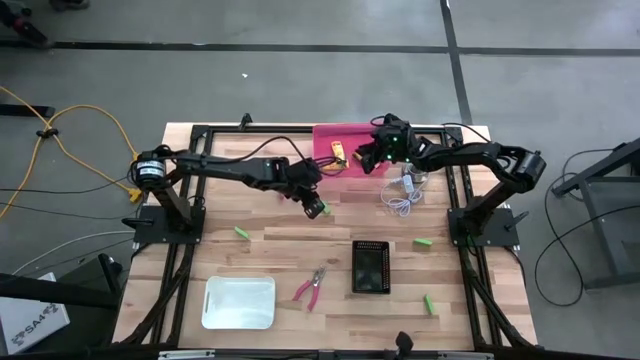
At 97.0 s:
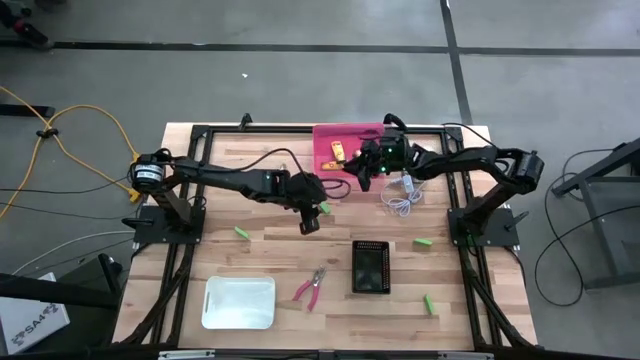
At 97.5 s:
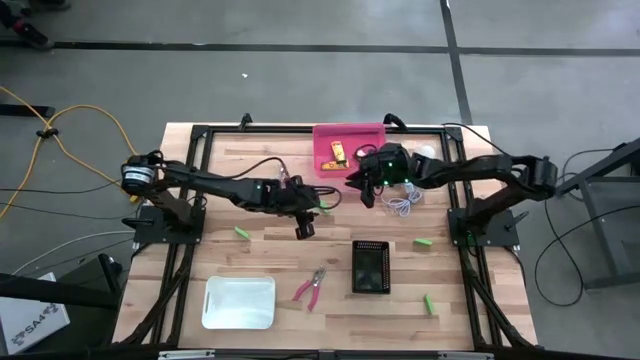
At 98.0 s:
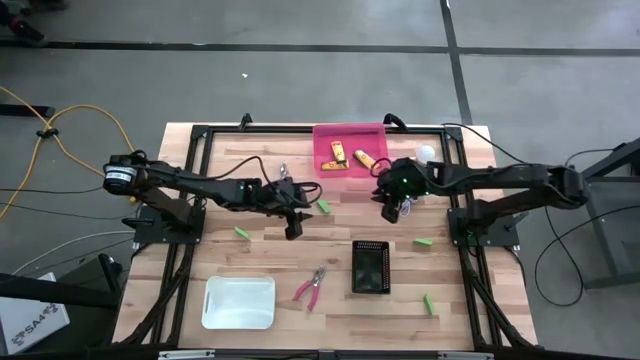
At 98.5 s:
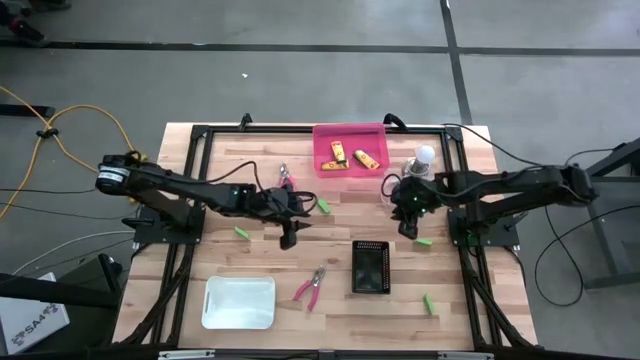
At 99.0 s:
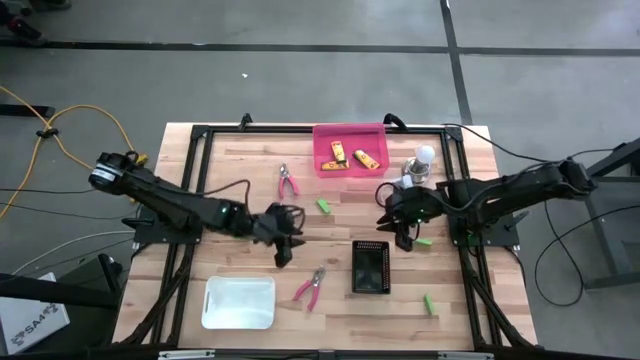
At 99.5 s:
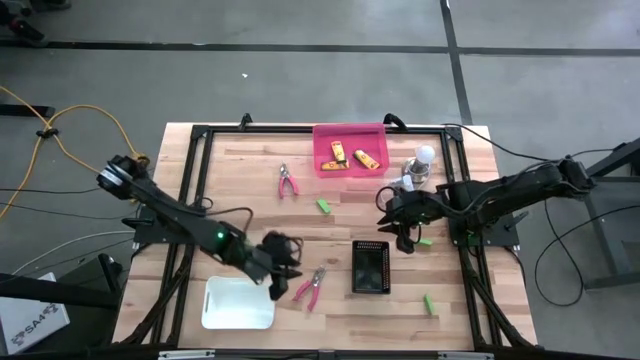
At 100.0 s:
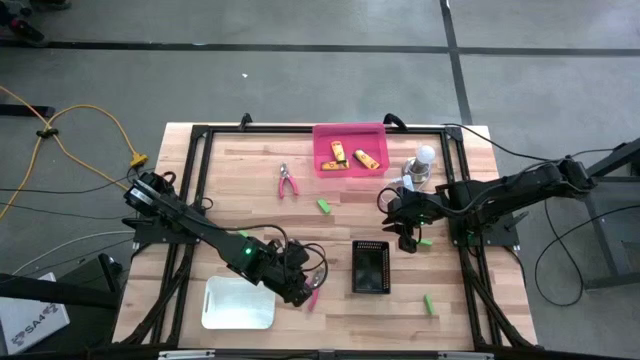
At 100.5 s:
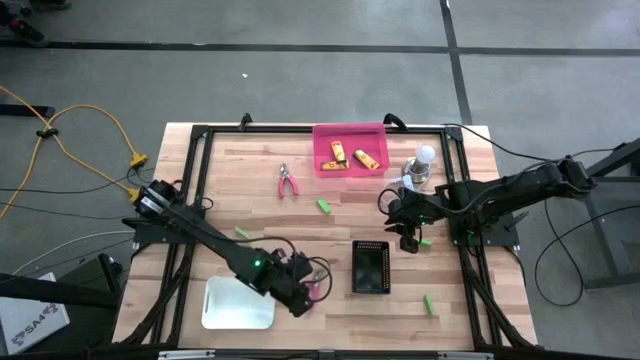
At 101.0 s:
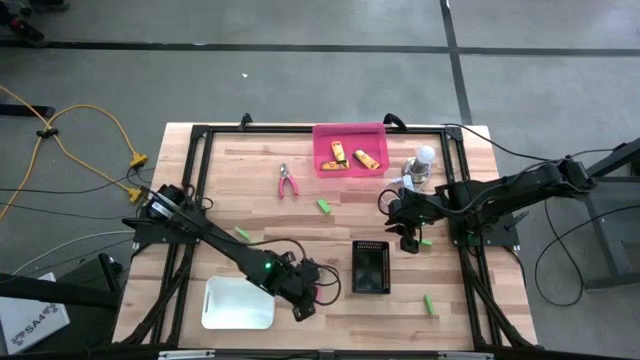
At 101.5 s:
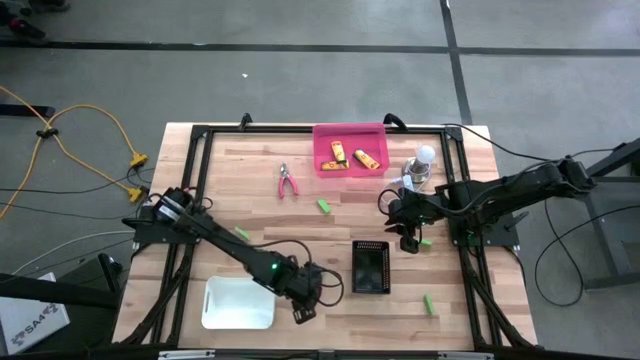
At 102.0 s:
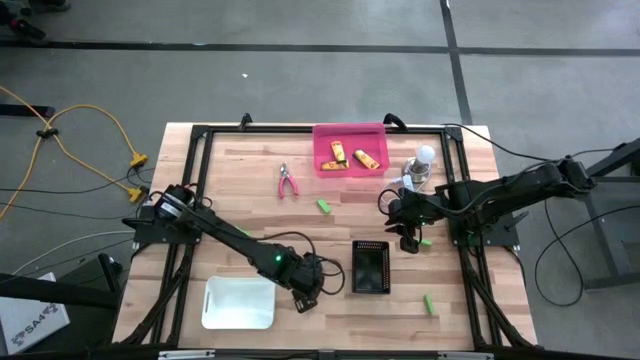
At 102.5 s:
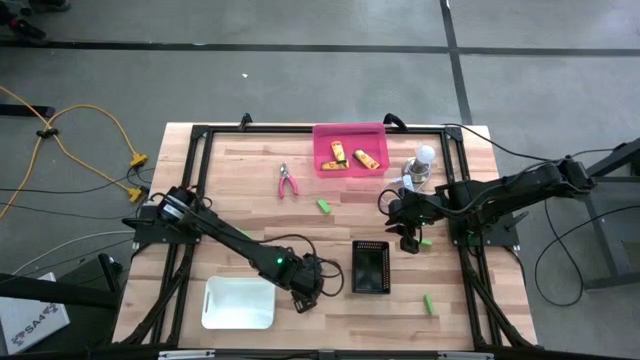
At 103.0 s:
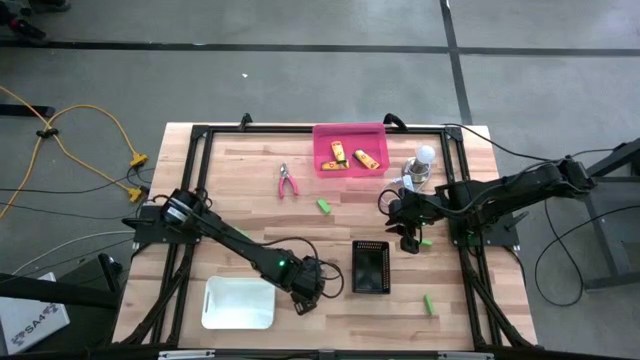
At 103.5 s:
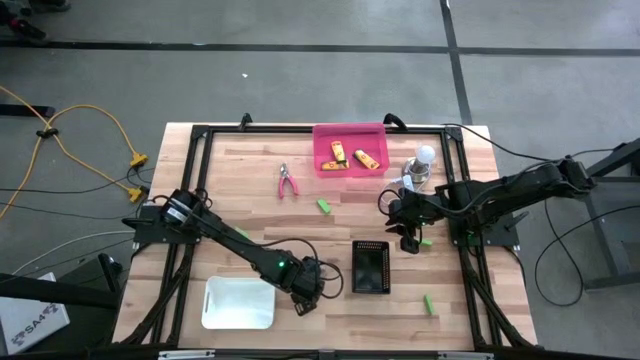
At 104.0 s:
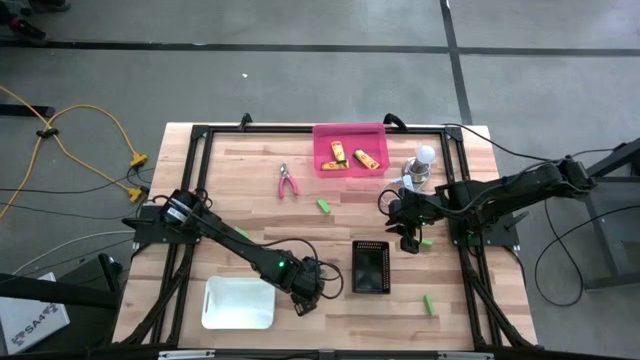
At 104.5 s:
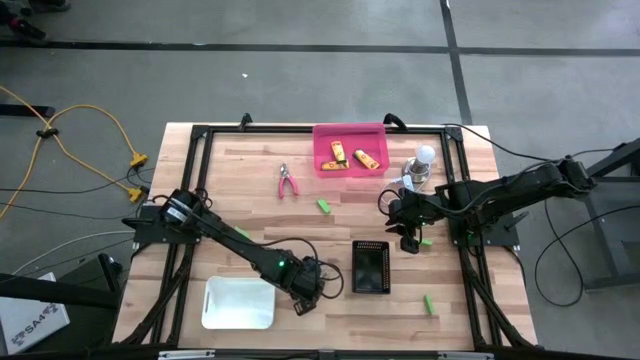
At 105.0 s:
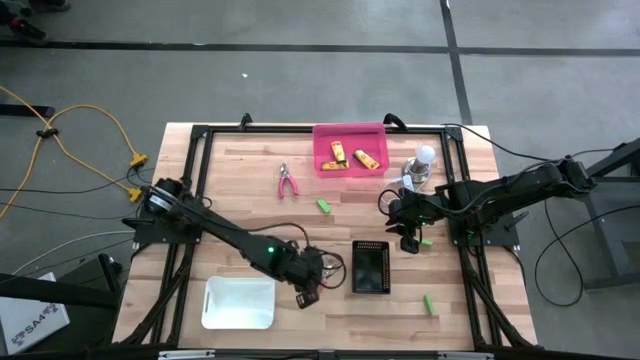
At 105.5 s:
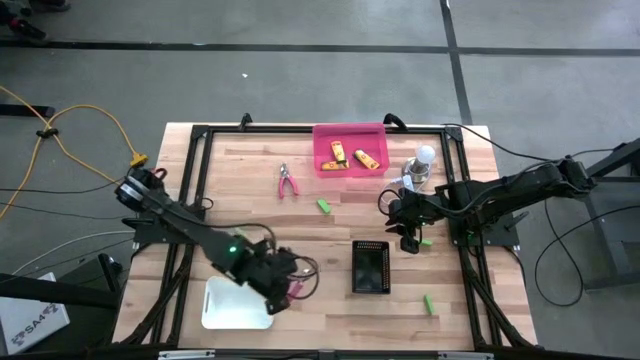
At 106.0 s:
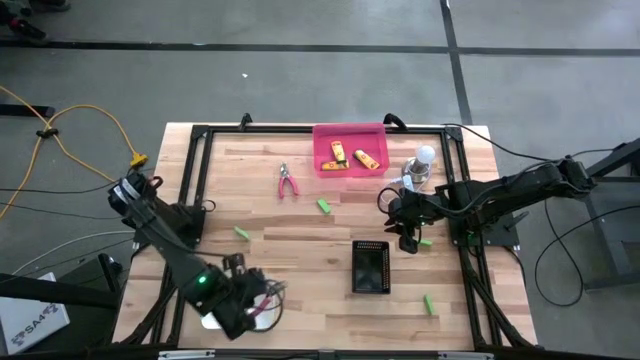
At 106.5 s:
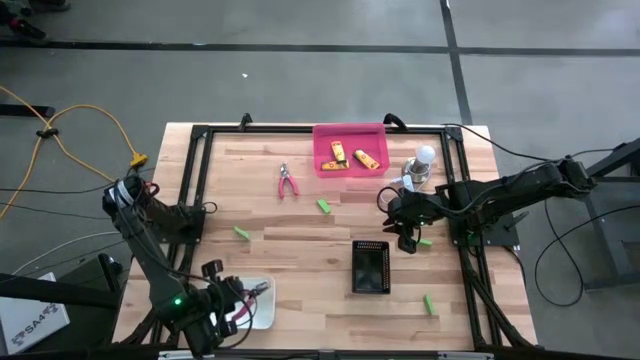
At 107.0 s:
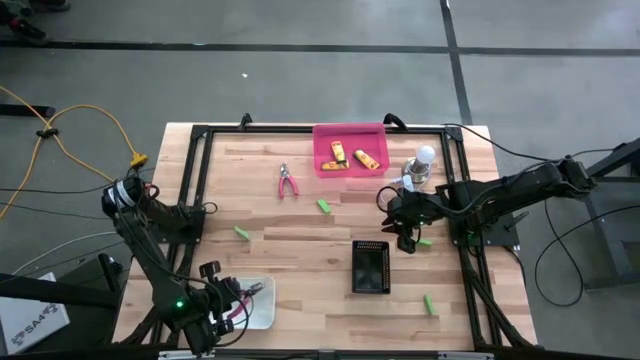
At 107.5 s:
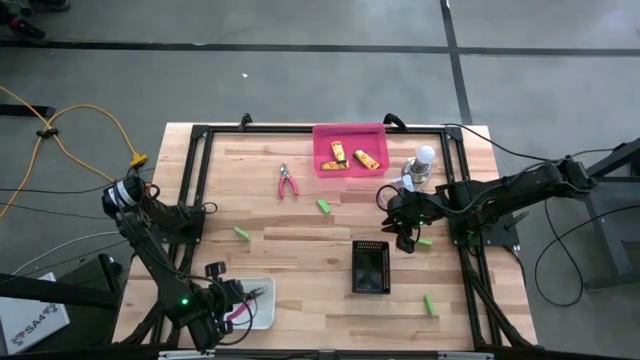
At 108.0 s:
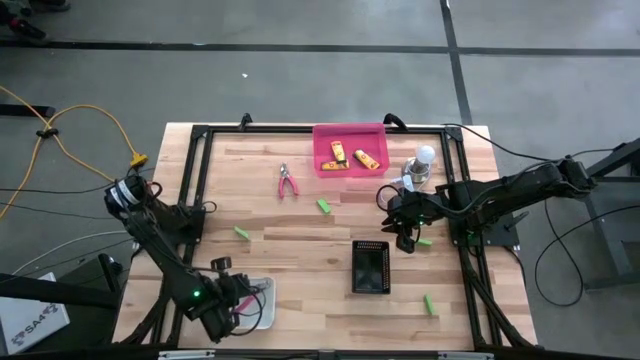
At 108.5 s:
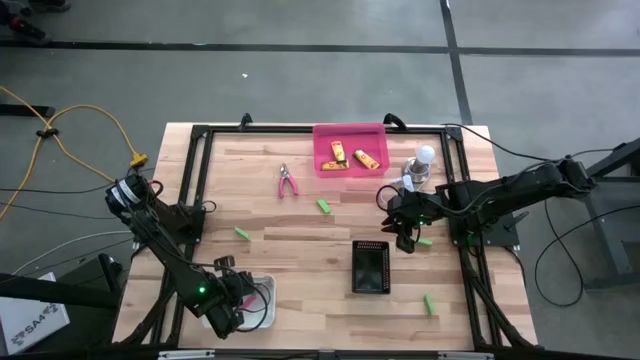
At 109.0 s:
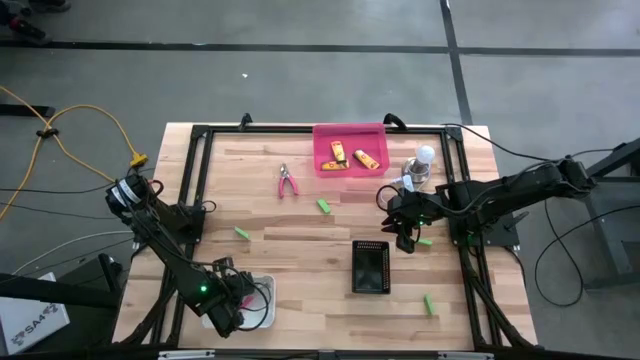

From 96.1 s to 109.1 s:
Task: Pick & Place School Supplies
Put the pink ticket punch into the white bin

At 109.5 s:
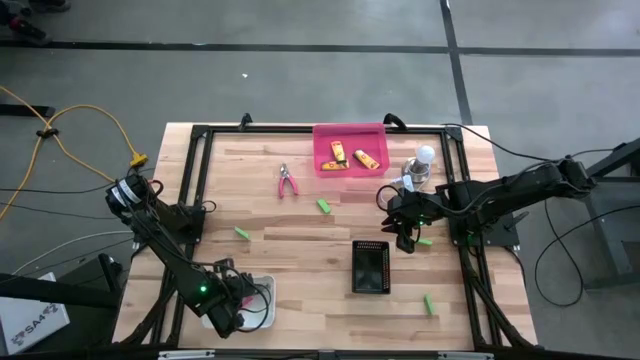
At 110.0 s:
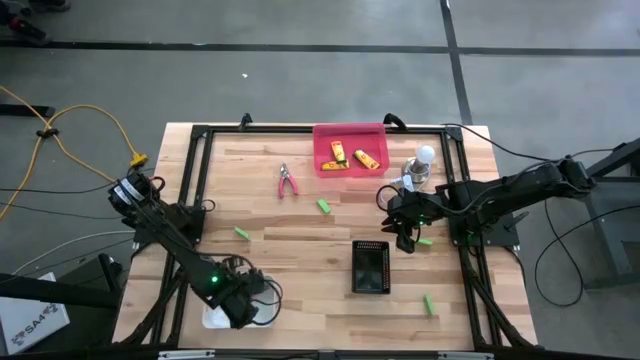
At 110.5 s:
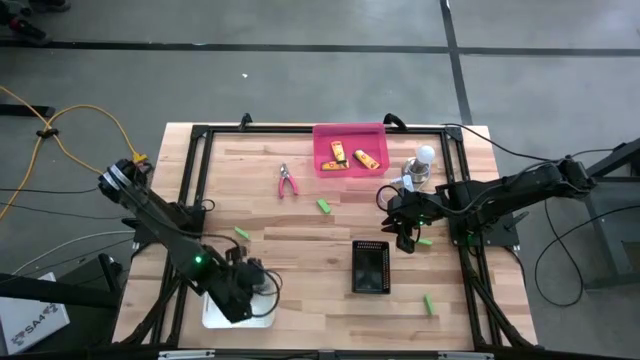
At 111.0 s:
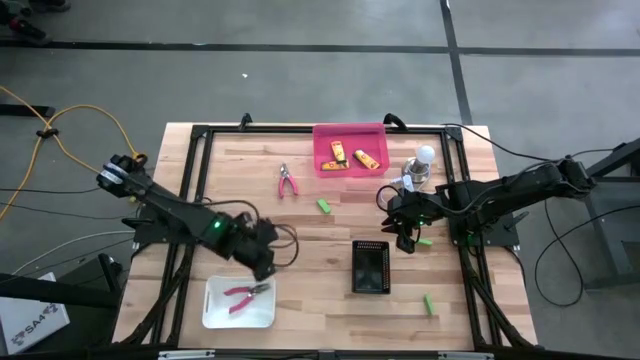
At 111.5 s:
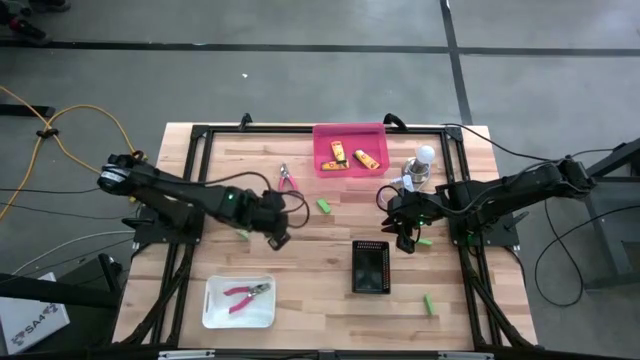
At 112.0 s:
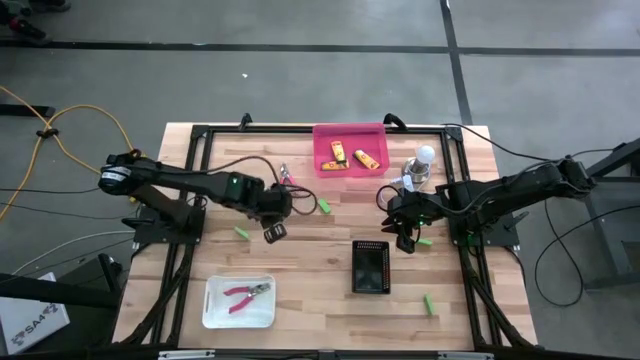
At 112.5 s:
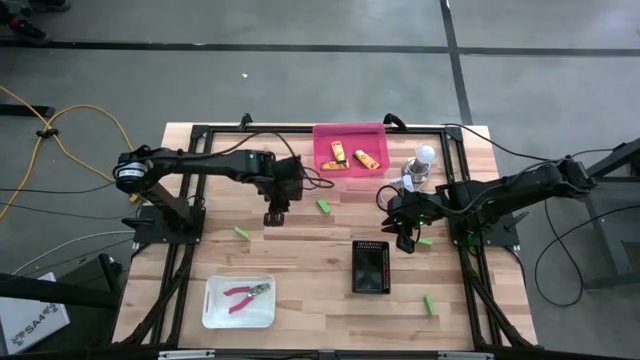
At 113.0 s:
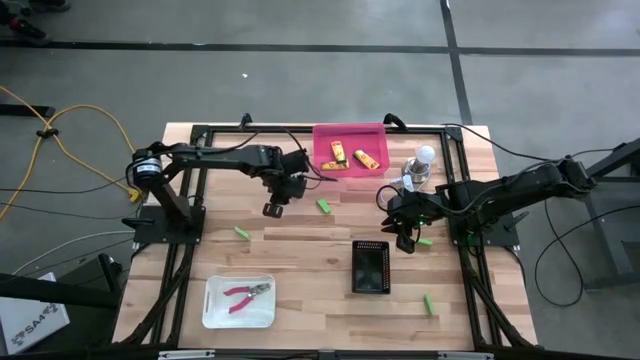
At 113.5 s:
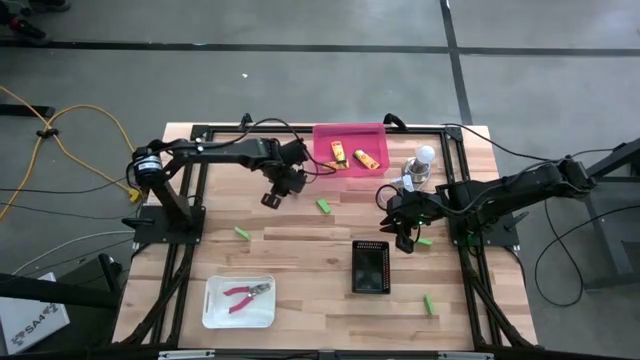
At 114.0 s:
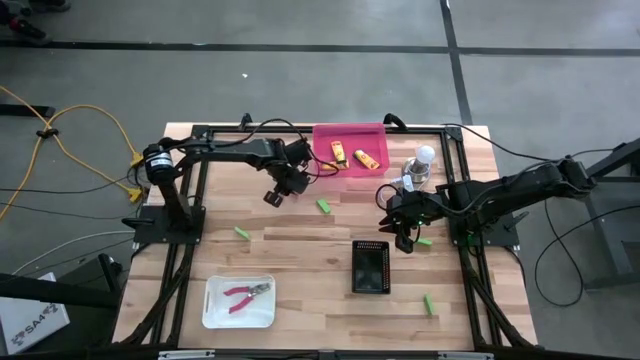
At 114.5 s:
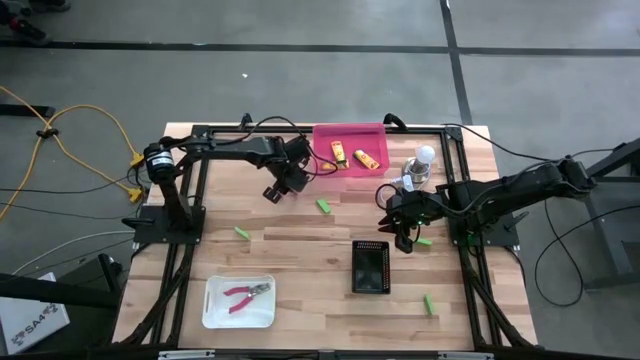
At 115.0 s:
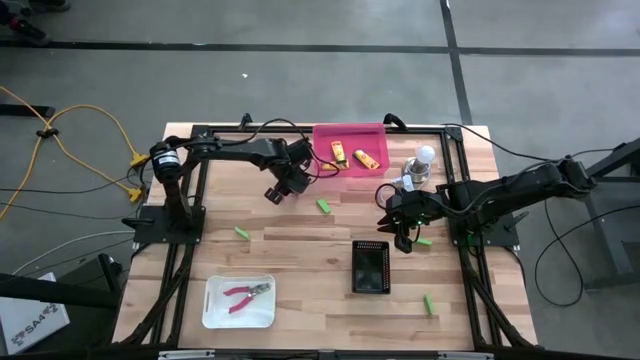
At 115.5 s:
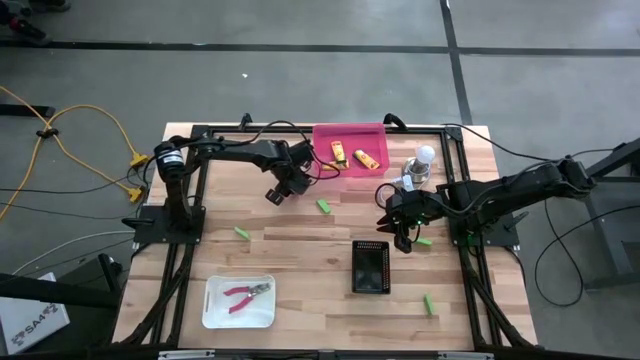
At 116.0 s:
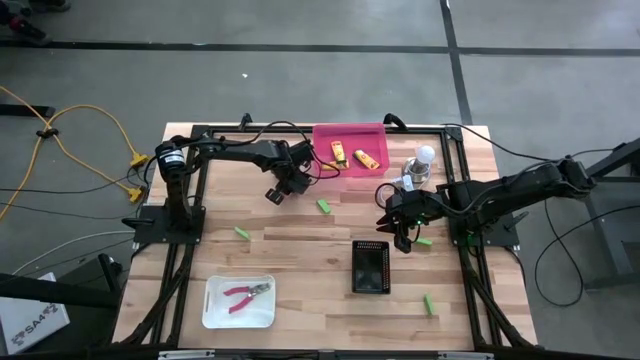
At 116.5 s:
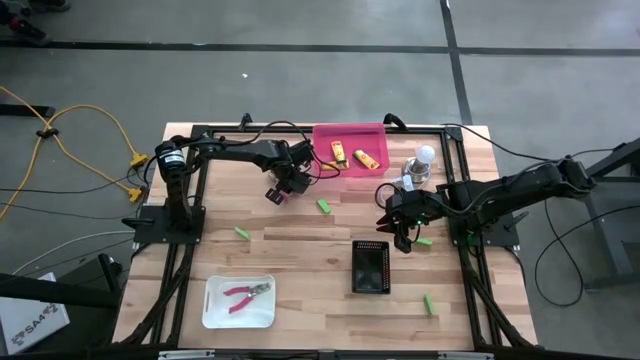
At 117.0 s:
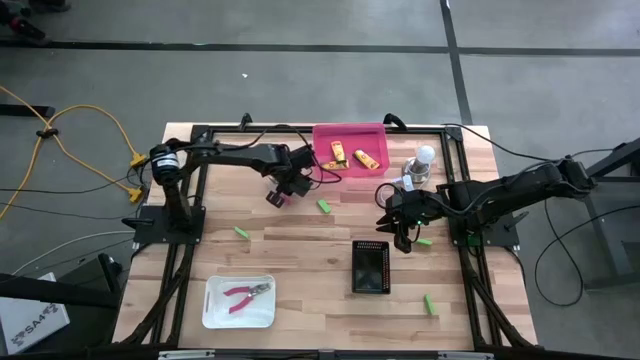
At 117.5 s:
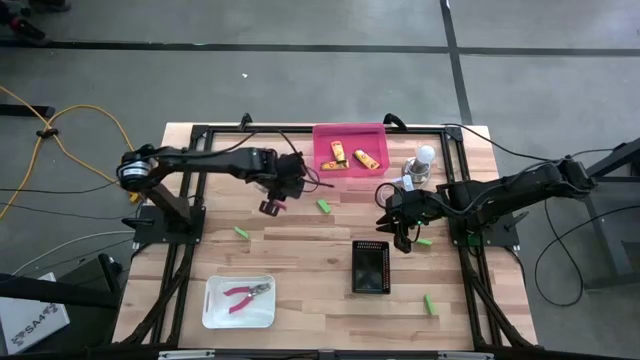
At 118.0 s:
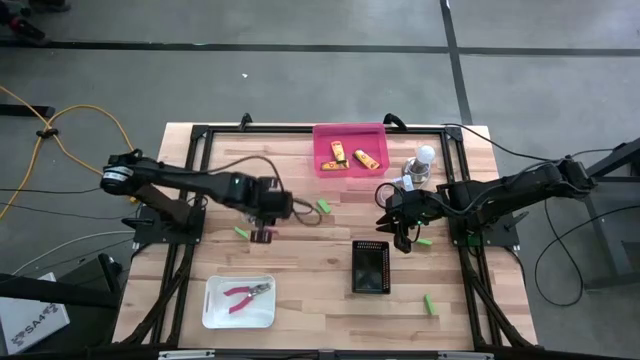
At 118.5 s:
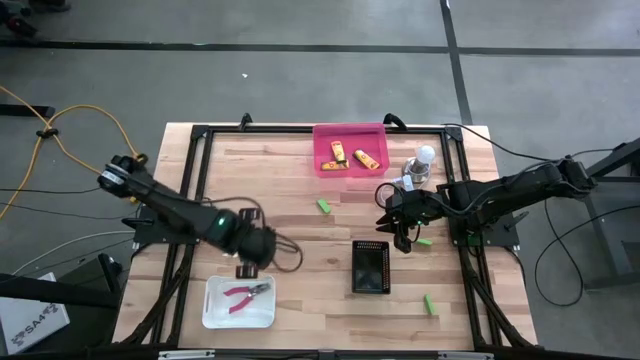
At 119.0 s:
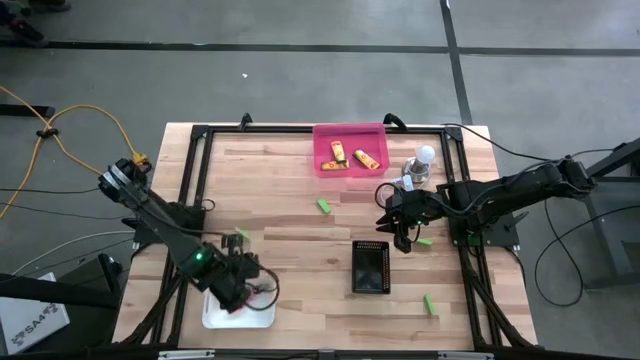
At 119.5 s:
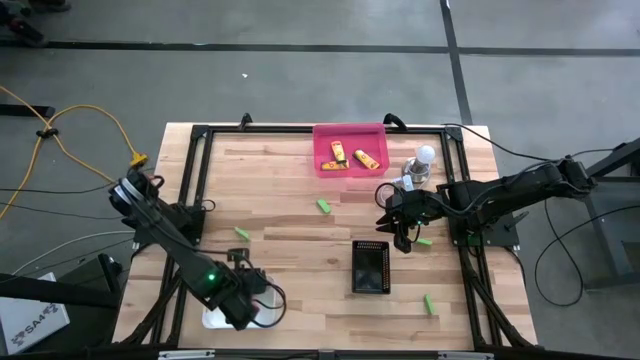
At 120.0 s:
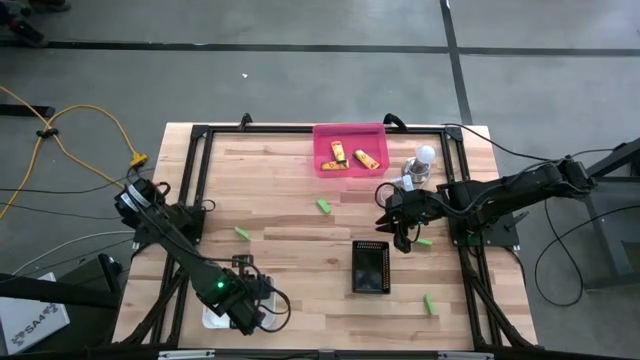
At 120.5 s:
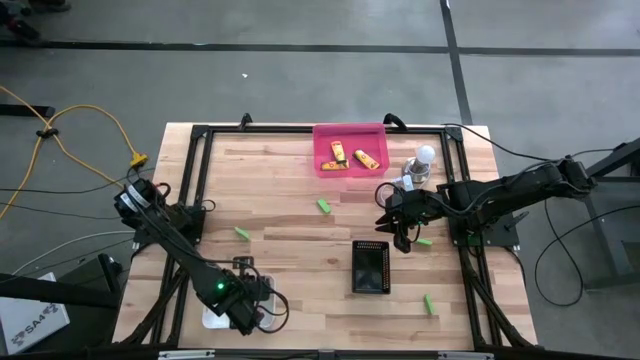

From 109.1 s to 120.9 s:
Put the pink ticket punch into the white bin
